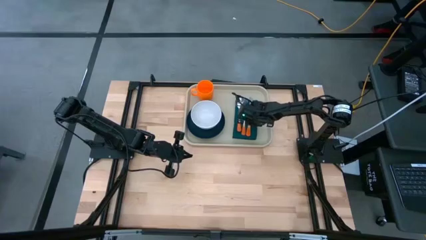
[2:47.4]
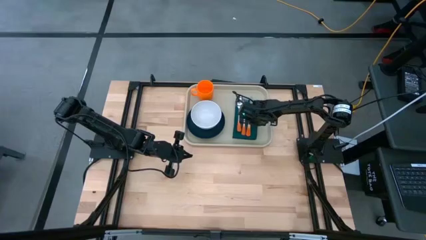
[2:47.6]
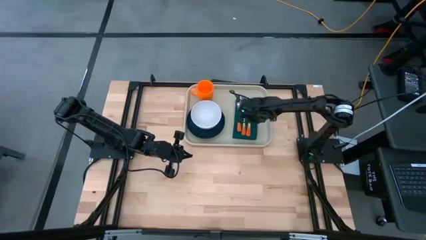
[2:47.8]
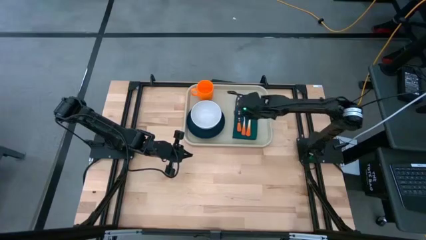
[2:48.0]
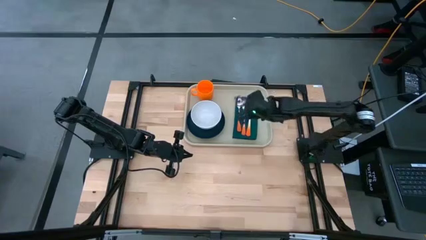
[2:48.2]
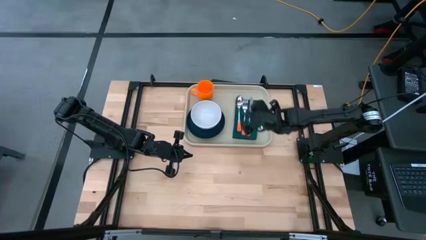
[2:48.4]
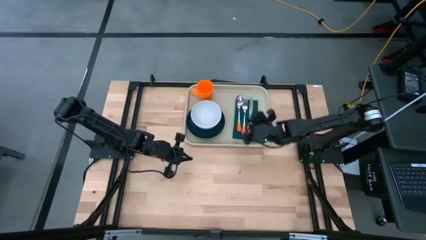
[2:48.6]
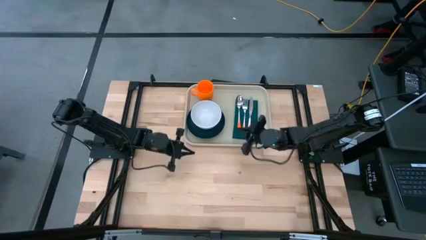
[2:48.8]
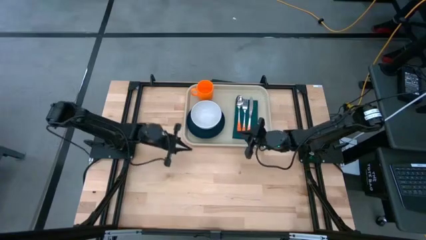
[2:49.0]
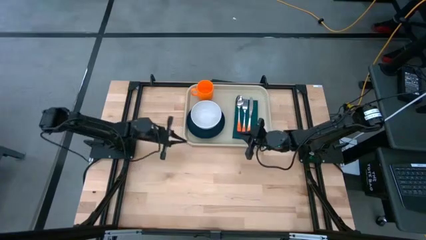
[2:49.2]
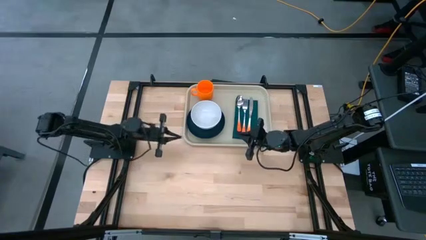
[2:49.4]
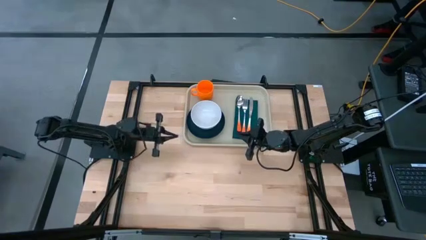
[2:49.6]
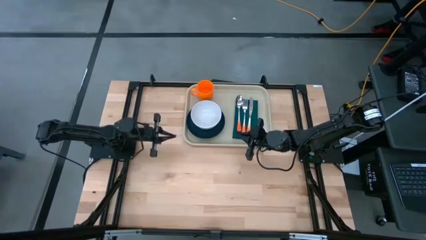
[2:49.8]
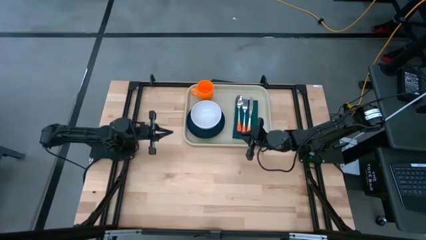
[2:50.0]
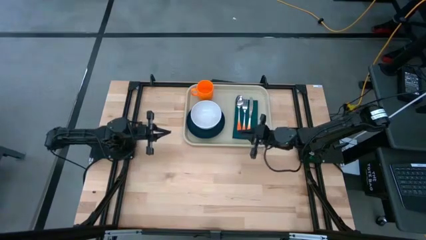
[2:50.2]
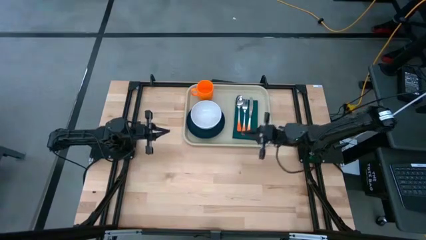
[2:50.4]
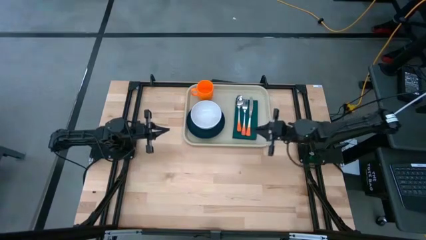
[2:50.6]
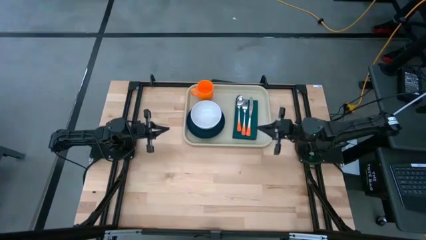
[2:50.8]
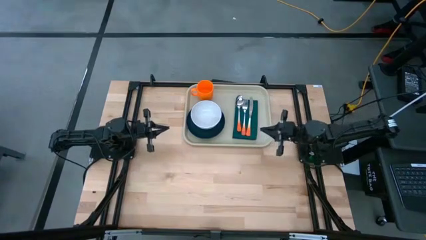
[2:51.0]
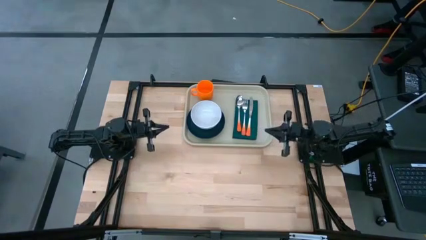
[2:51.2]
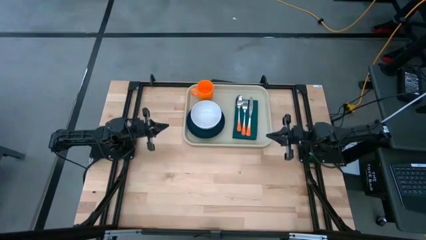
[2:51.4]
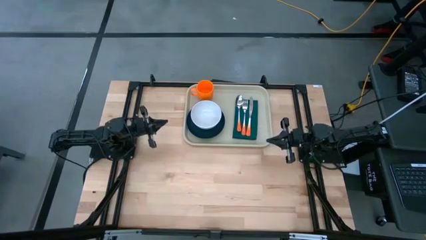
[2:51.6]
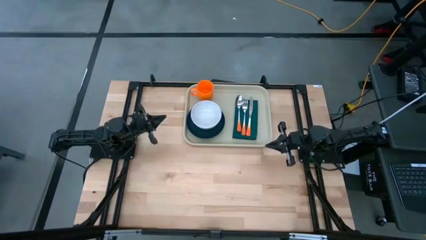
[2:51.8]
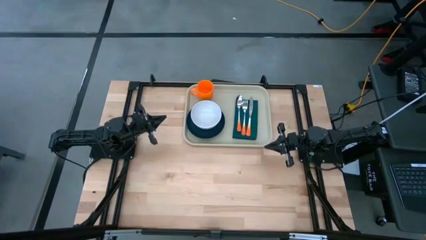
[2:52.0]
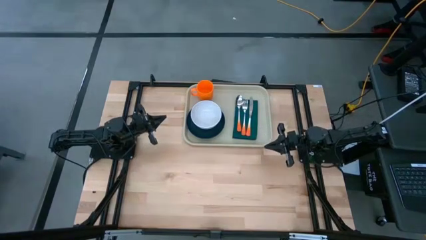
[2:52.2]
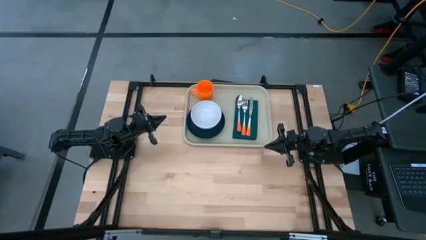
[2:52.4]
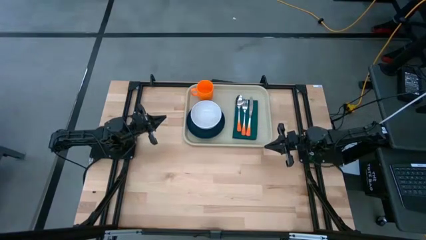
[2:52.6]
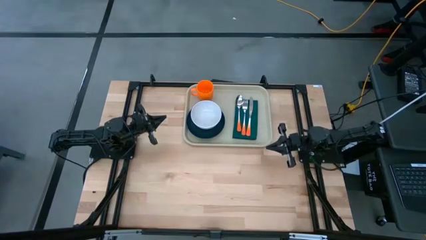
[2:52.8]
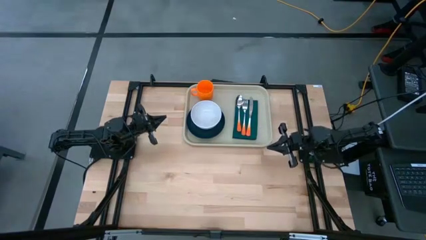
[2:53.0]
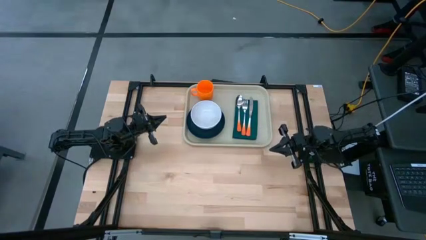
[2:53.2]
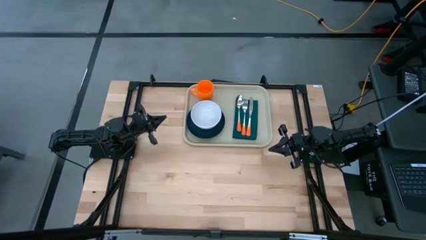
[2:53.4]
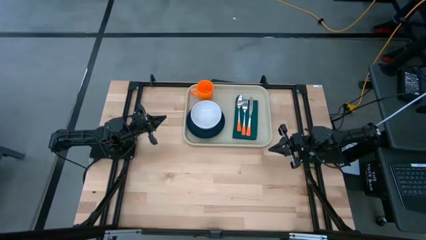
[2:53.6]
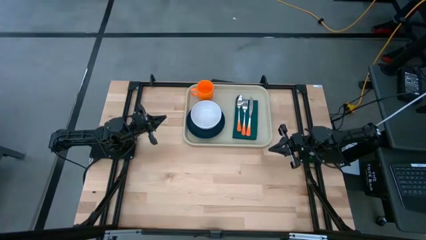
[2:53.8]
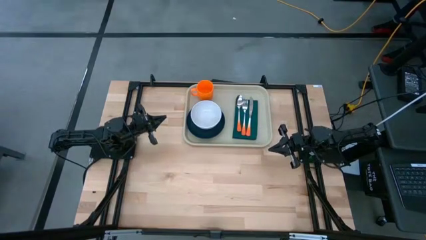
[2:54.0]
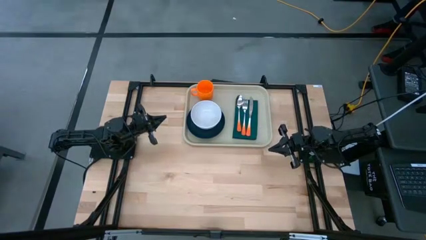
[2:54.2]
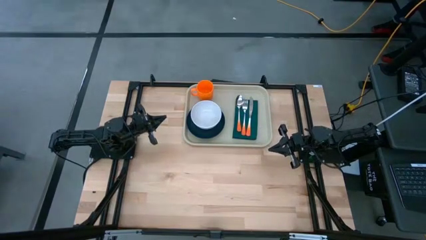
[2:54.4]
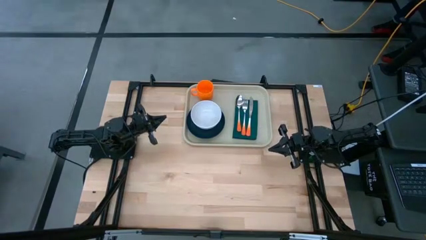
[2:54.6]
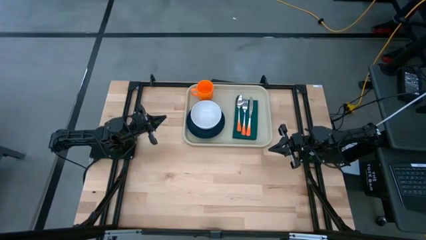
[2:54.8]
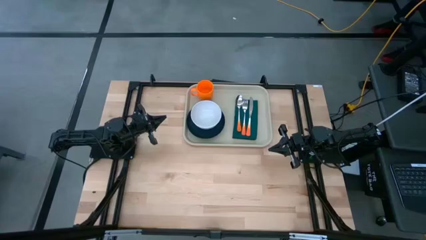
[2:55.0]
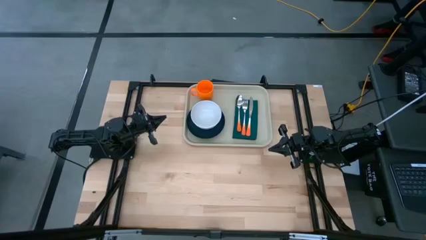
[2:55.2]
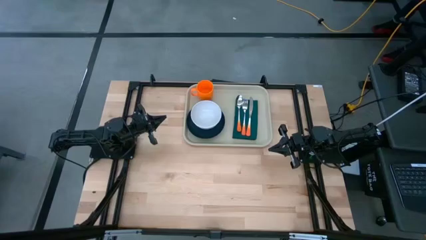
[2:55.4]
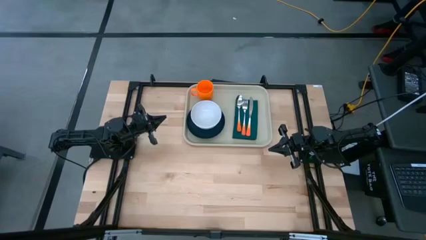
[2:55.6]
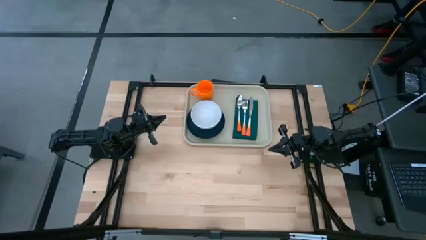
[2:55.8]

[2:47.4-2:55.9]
Task: Set up tray
Return to Home Position

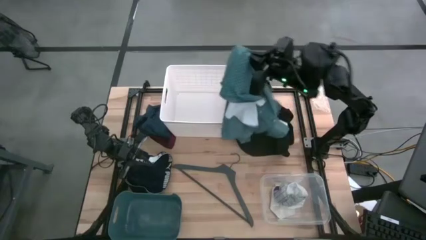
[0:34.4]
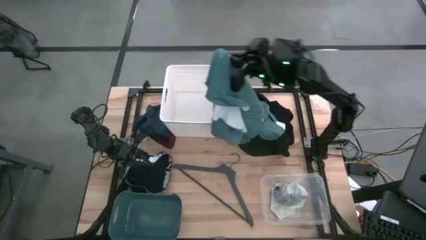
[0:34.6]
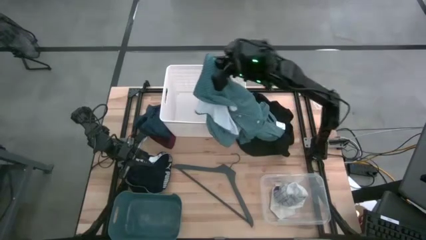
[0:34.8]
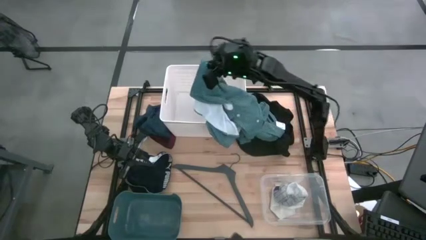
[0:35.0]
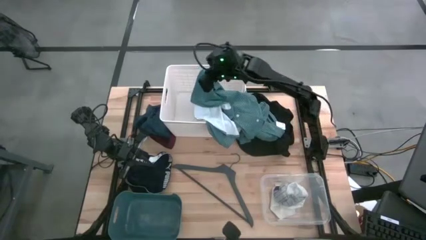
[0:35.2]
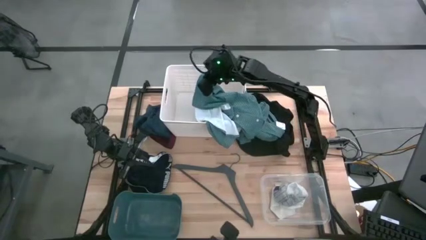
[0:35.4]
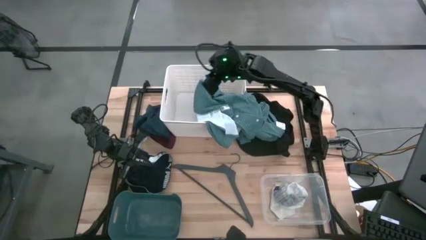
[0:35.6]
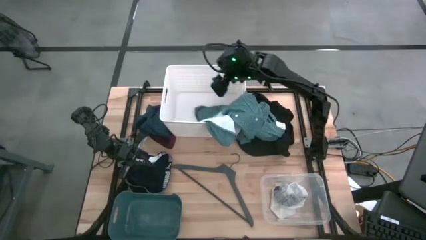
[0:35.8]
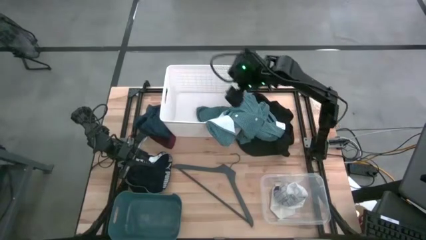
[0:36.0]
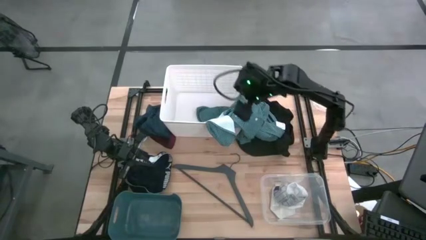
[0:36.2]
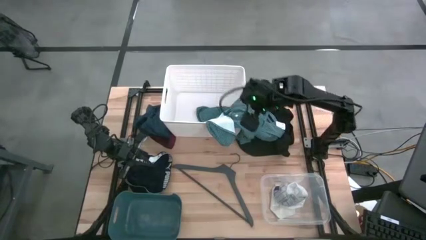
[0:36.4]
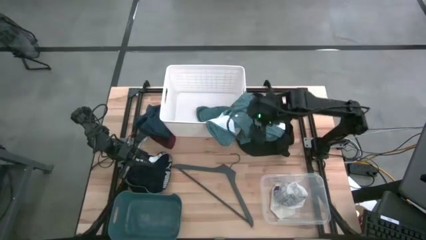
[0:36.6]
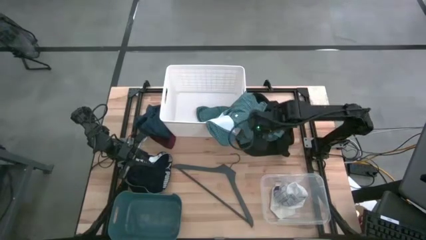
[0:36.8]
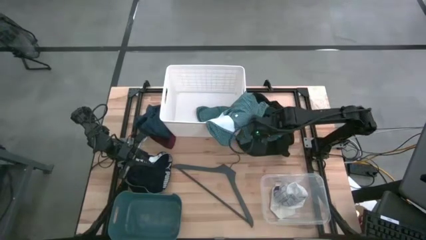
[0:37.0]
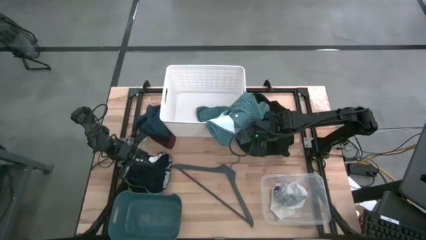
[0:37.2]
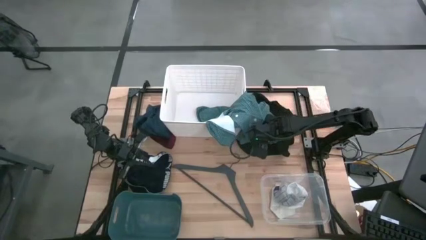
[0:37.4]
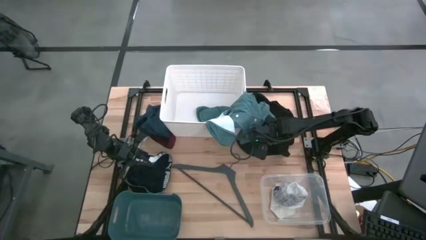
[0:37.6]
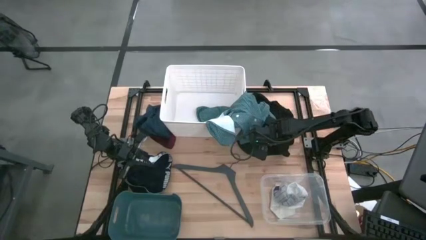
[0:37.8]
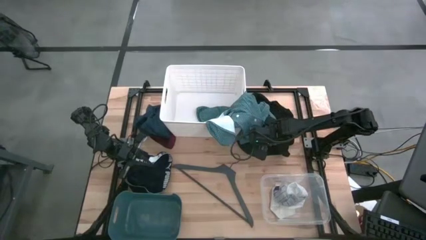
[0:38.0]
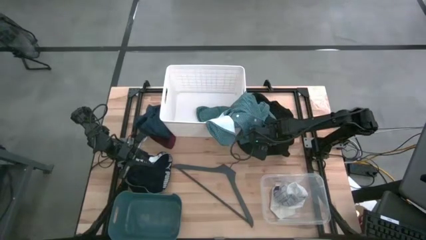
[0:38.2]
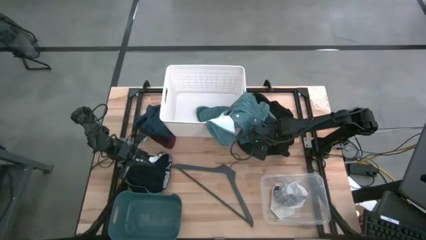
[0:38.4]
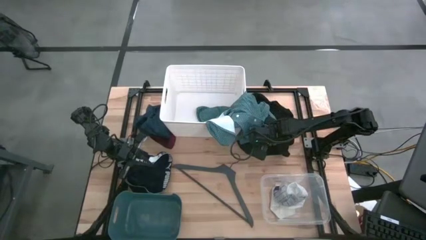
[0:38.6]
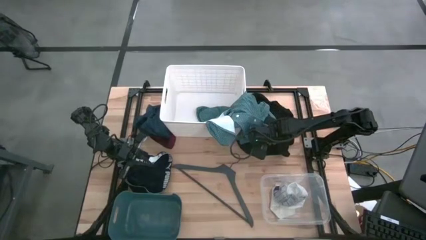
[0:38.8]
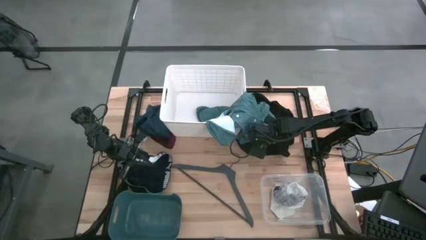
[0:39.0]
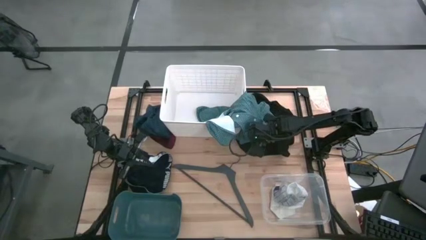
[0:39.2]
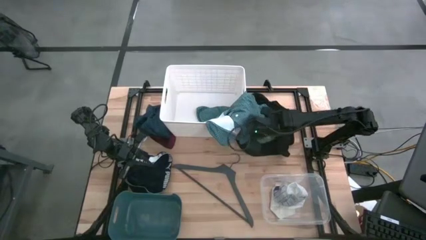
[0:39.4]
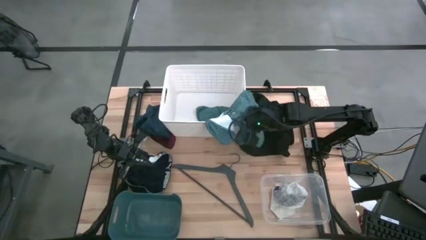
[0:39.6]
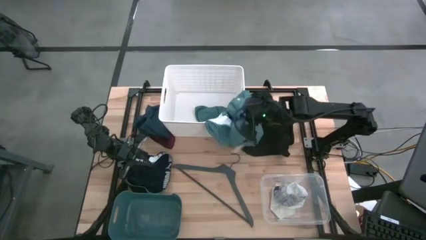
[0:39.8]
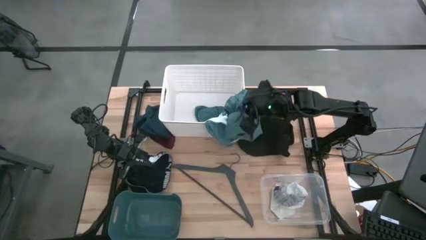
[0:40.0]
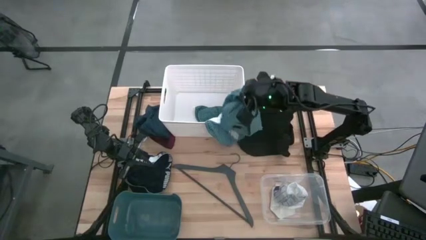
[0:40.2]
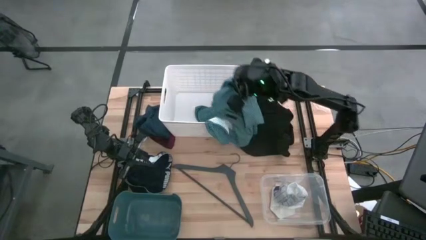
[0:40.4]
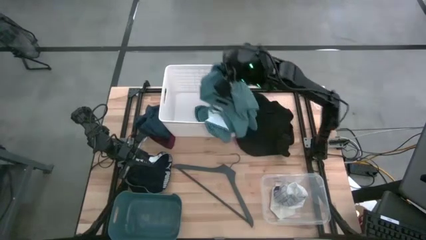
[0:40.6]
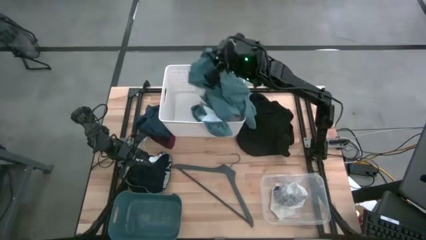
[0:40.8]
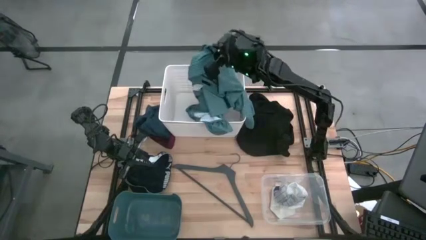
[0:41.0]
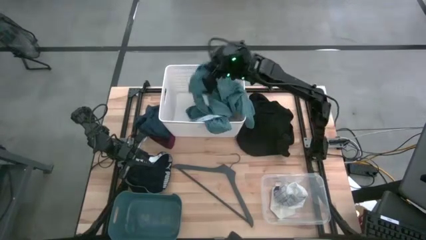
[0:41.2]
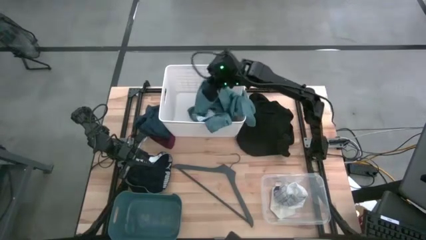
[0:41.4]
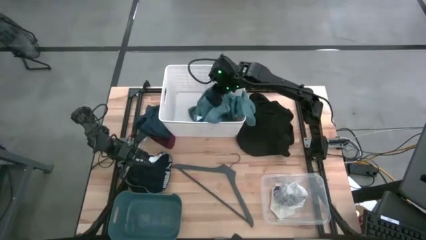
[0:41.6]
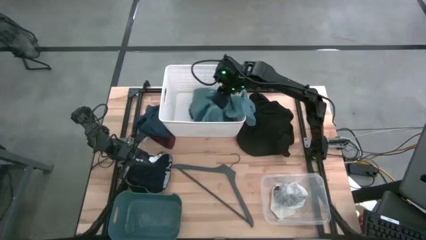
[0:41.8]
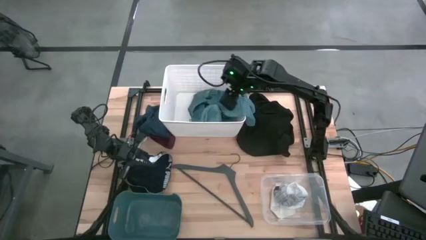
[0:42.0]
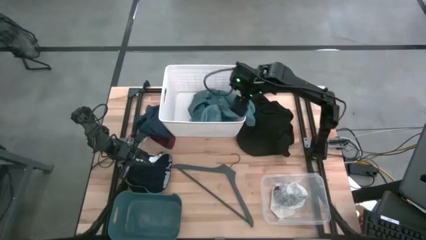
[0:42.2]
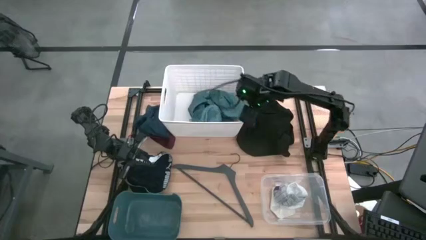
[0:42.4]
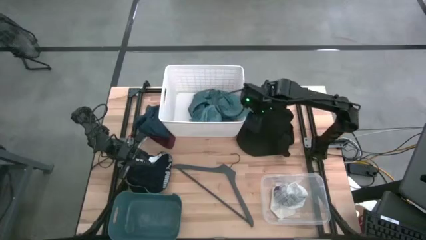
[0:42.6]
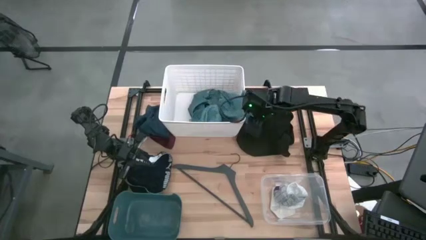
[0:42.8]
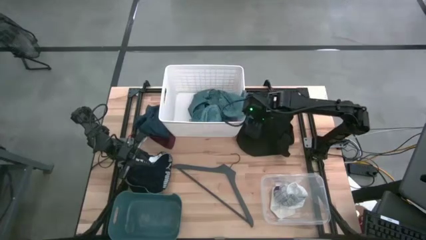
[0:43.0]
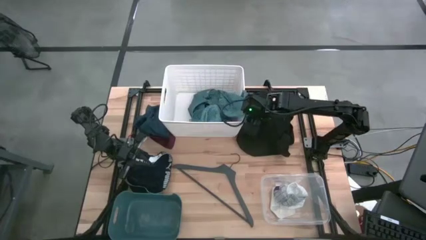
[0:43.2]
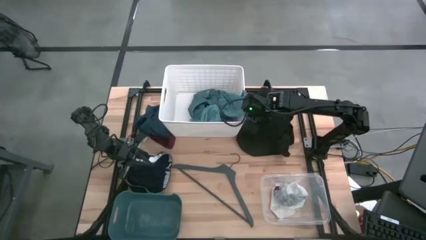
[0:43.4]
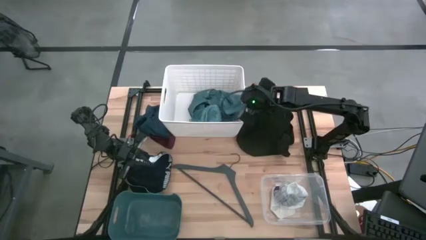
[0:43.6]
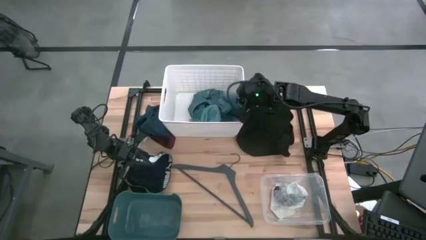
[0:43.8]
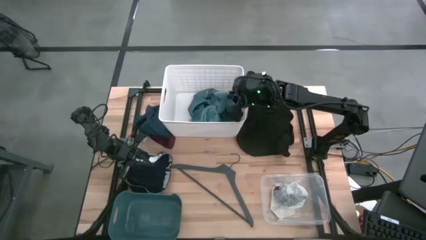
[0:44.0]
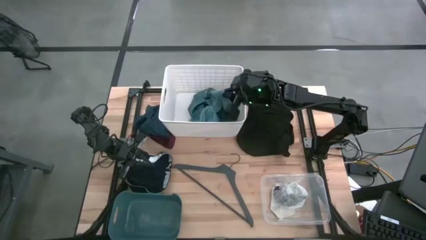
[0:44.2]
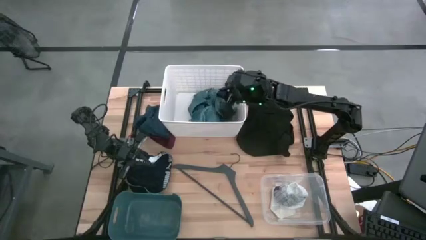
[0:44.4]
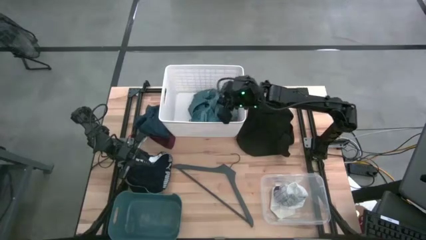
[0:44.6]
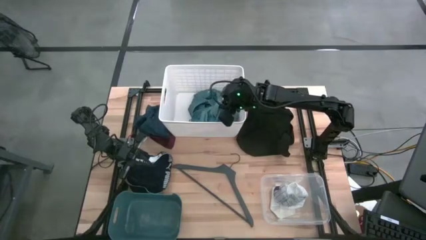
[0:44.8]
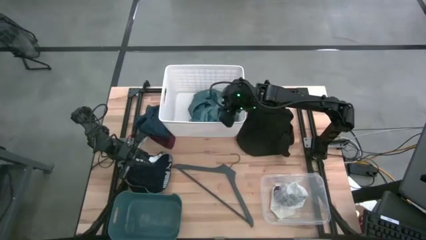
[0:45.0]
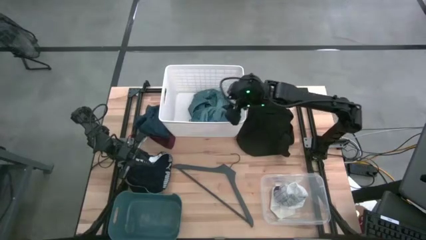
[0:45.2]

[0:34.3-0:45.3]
Task: Pick & Place Cloths
Put the light green polo shirt into the white laundry bin
